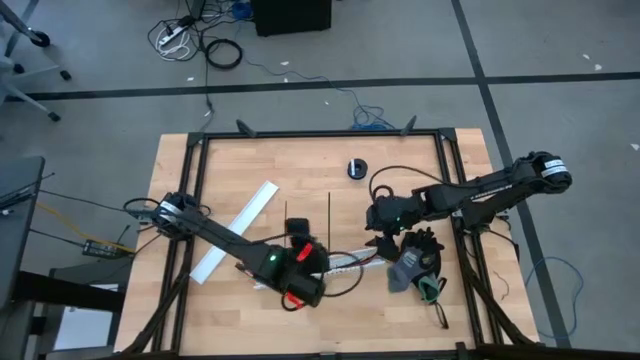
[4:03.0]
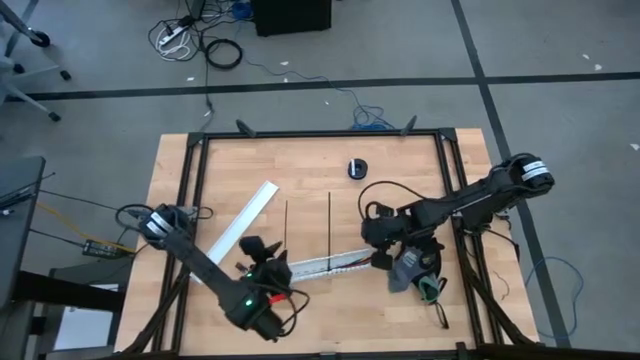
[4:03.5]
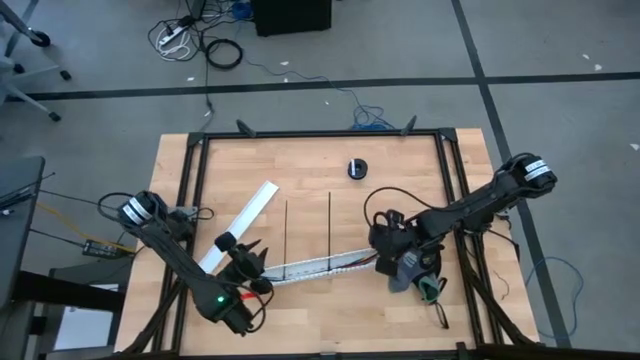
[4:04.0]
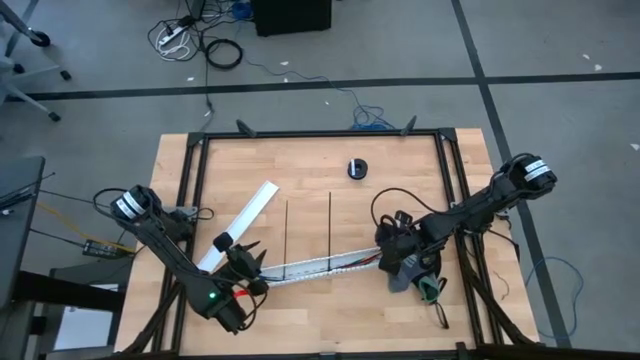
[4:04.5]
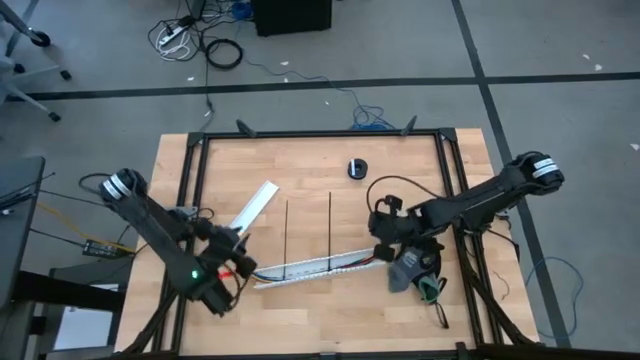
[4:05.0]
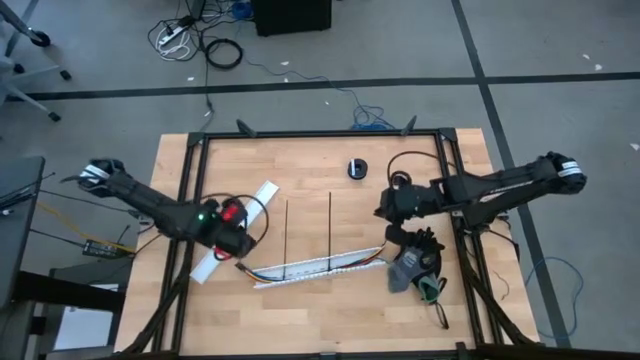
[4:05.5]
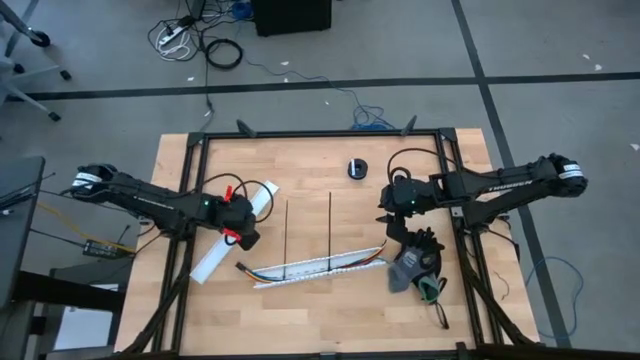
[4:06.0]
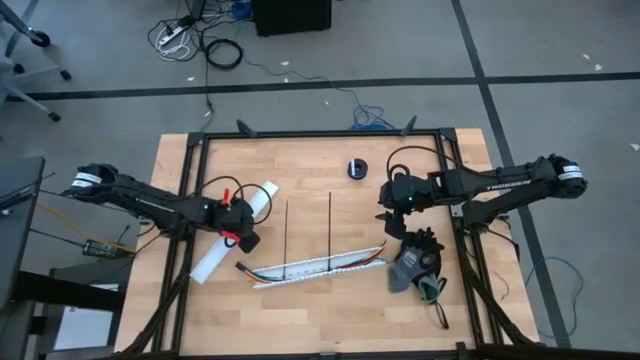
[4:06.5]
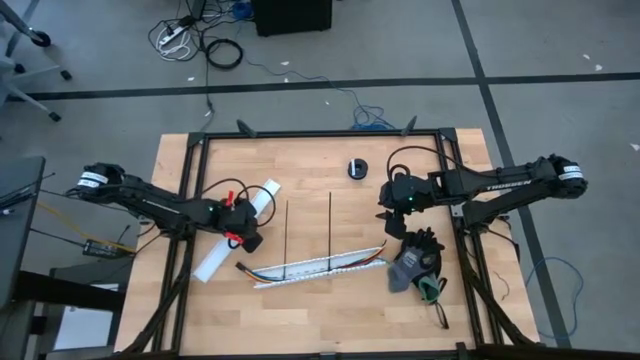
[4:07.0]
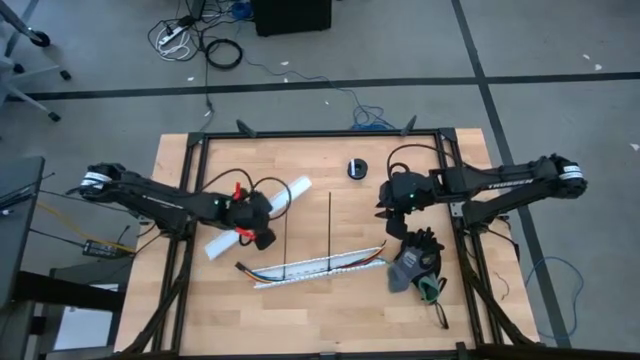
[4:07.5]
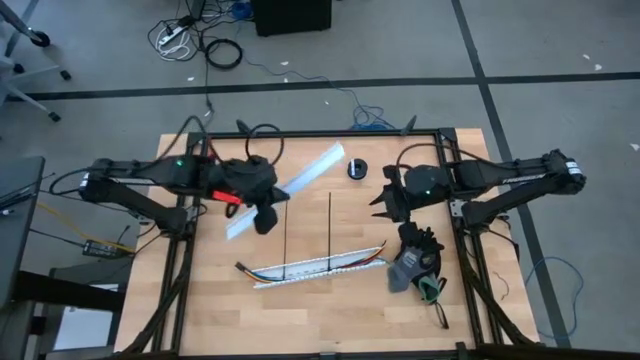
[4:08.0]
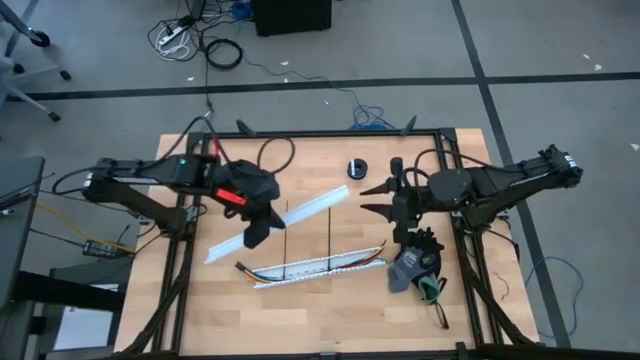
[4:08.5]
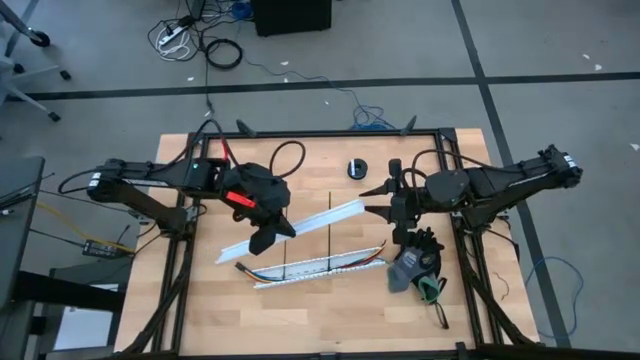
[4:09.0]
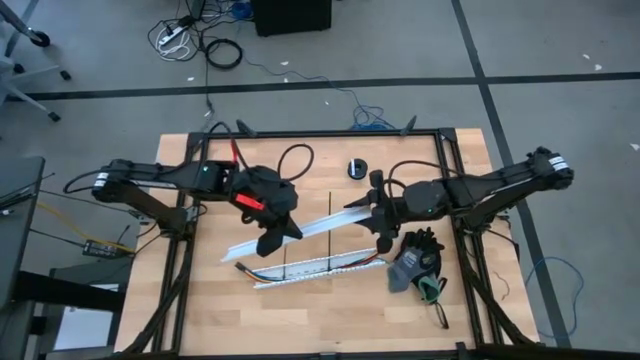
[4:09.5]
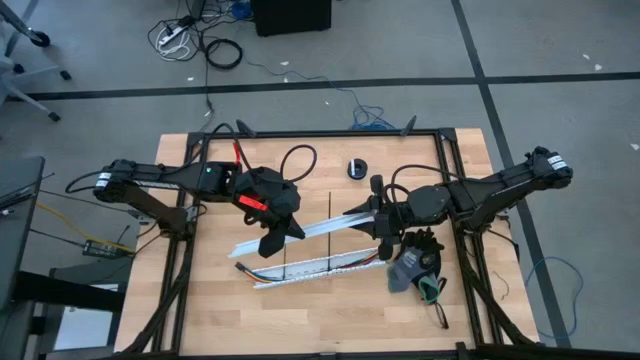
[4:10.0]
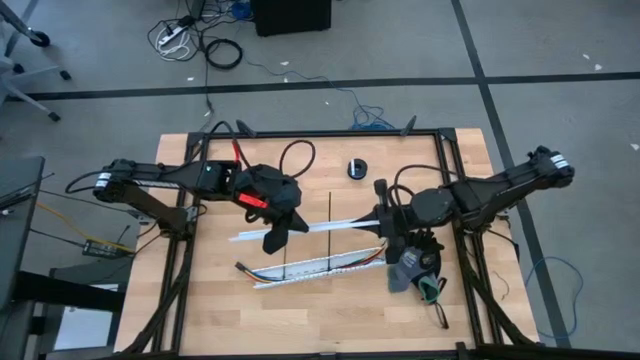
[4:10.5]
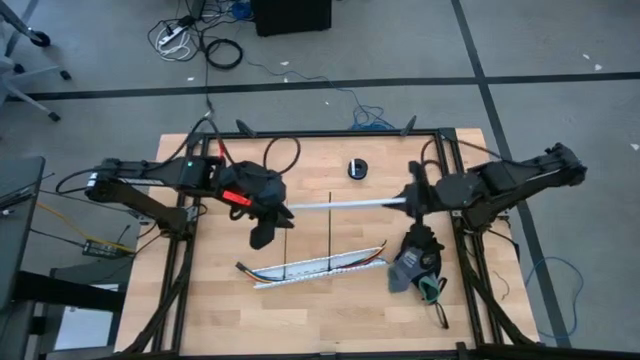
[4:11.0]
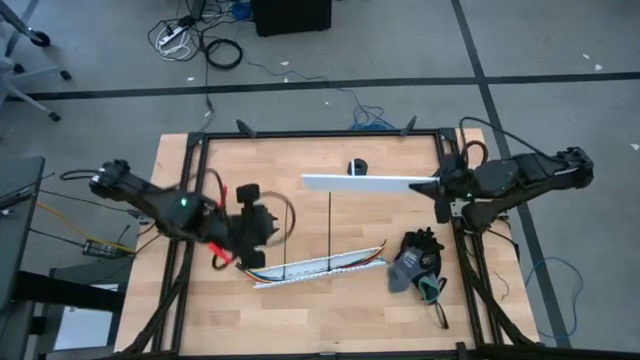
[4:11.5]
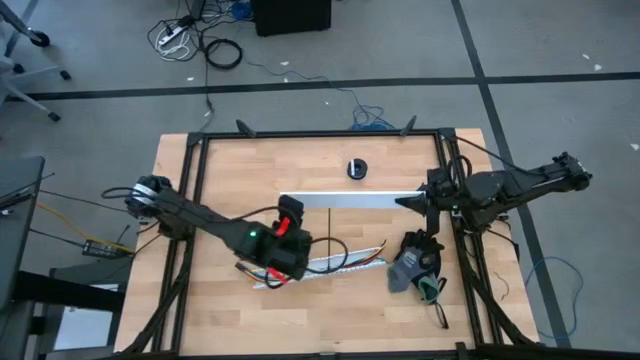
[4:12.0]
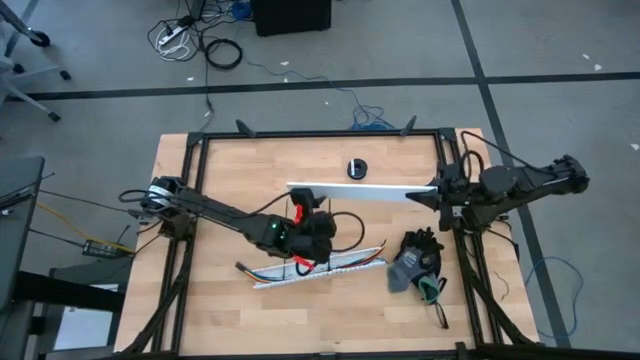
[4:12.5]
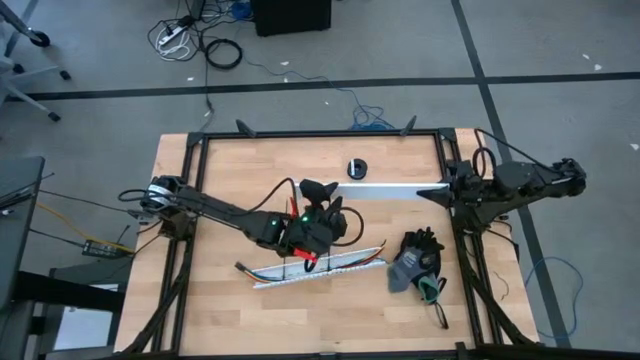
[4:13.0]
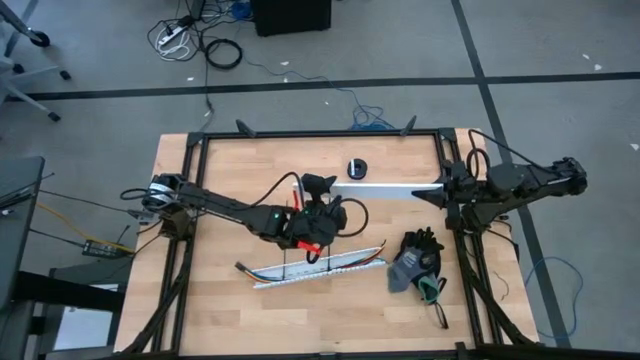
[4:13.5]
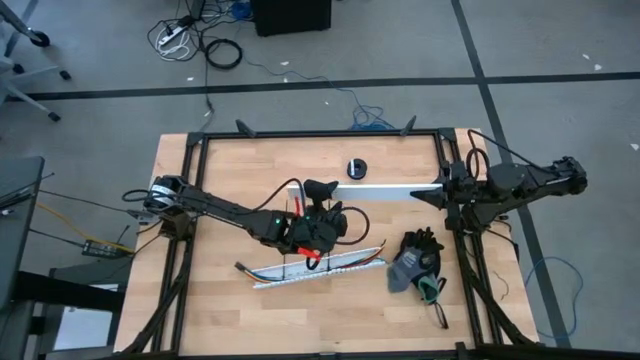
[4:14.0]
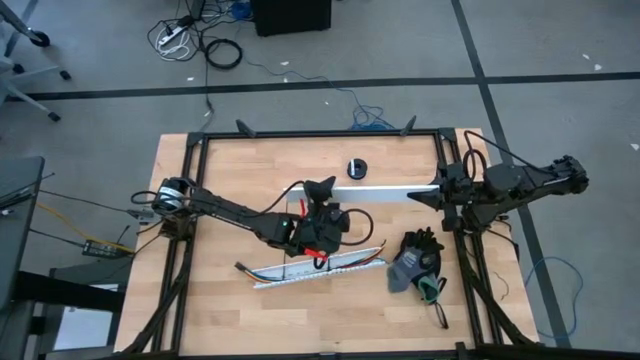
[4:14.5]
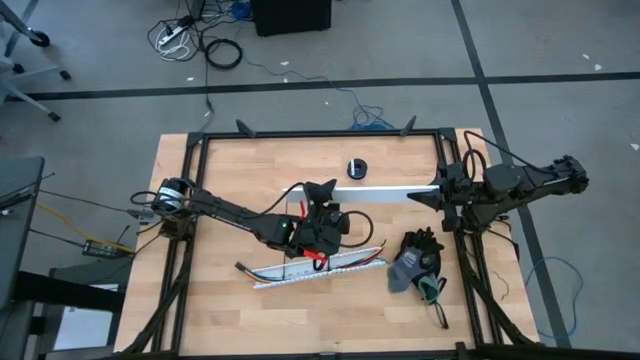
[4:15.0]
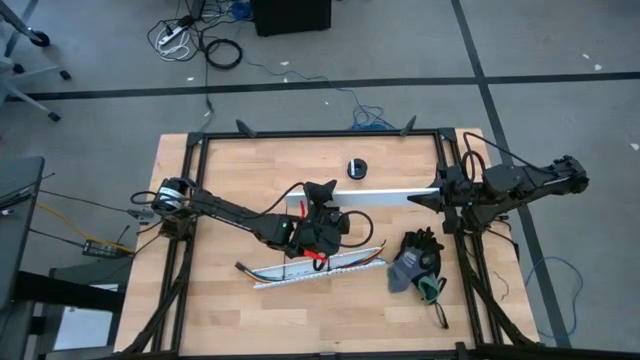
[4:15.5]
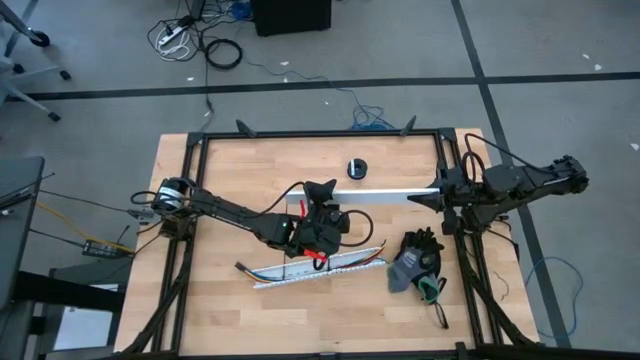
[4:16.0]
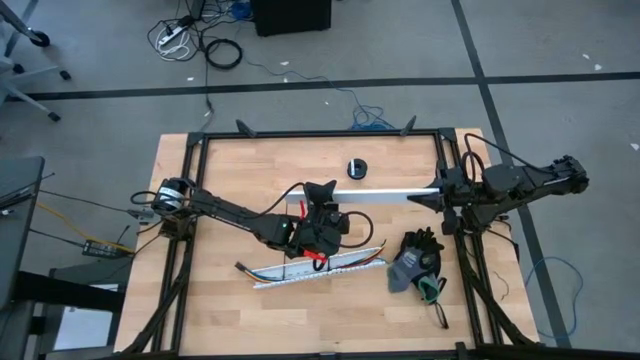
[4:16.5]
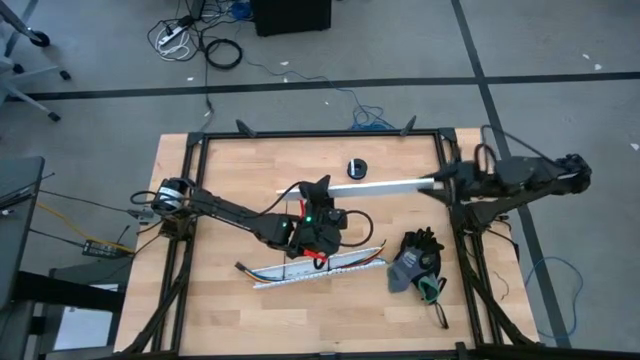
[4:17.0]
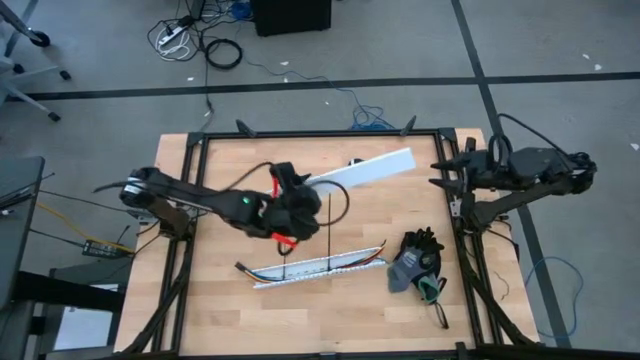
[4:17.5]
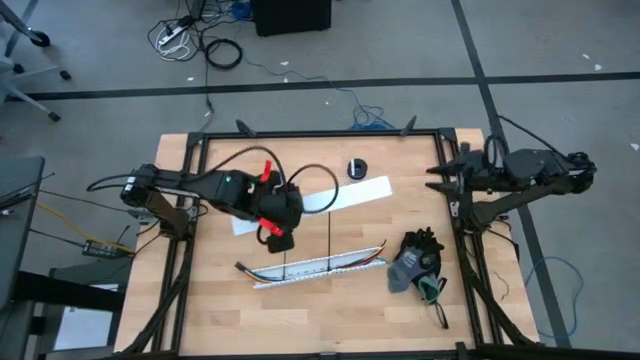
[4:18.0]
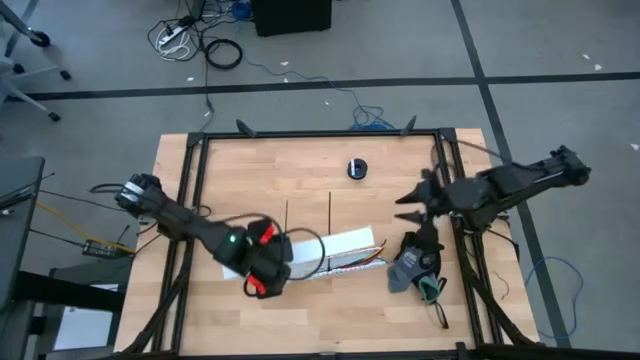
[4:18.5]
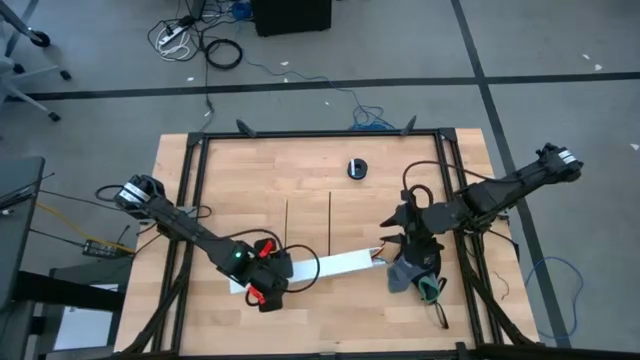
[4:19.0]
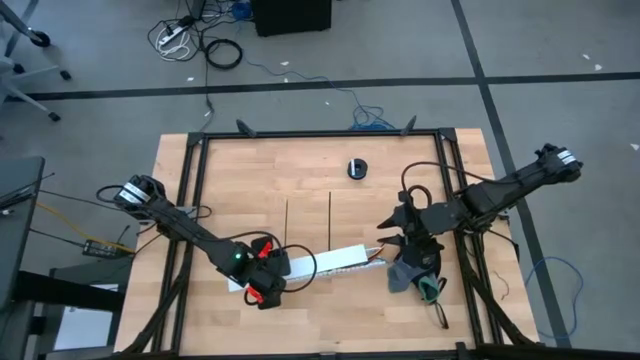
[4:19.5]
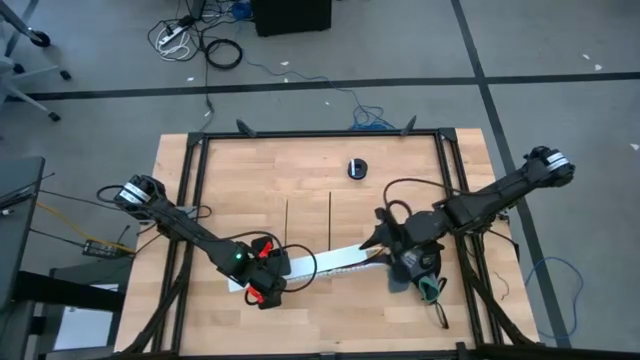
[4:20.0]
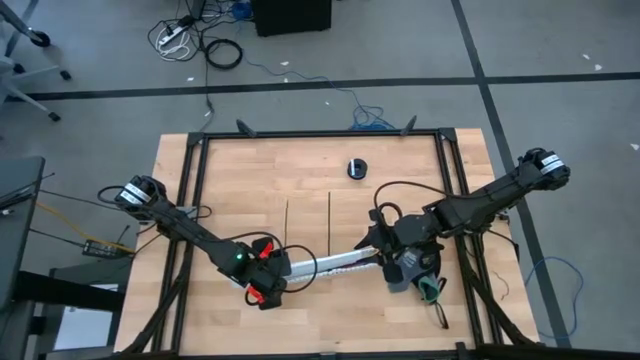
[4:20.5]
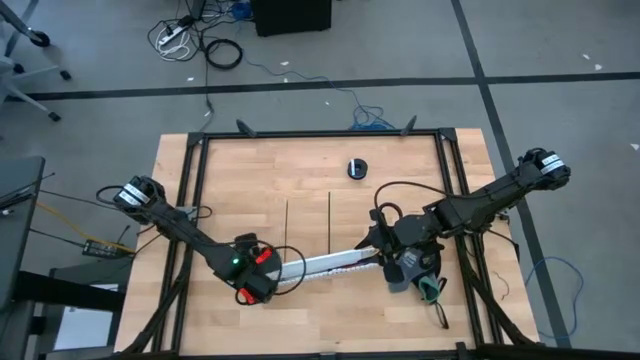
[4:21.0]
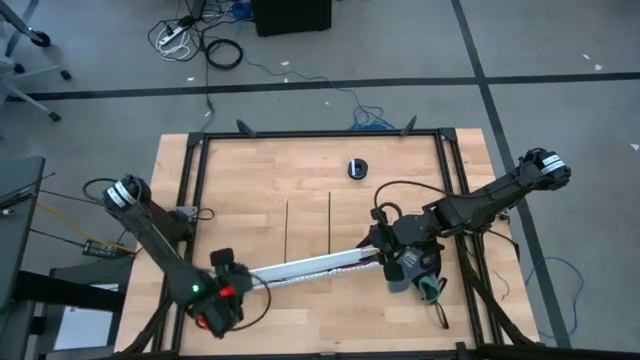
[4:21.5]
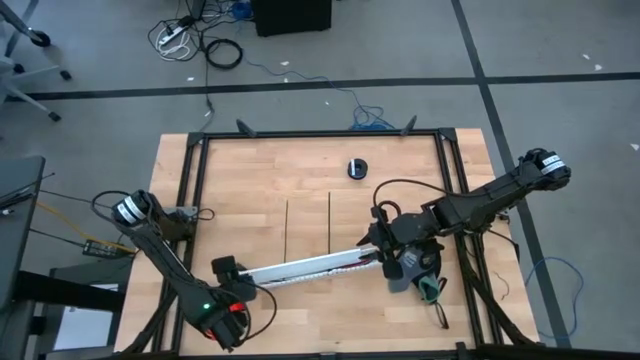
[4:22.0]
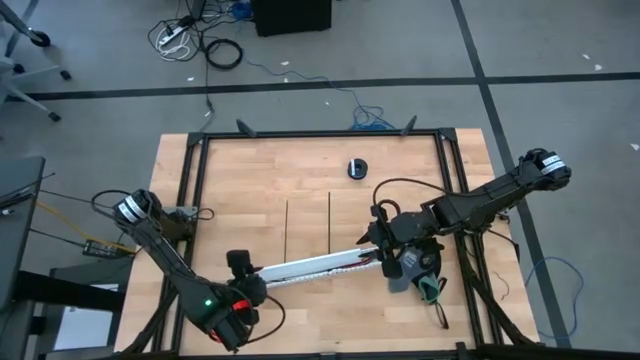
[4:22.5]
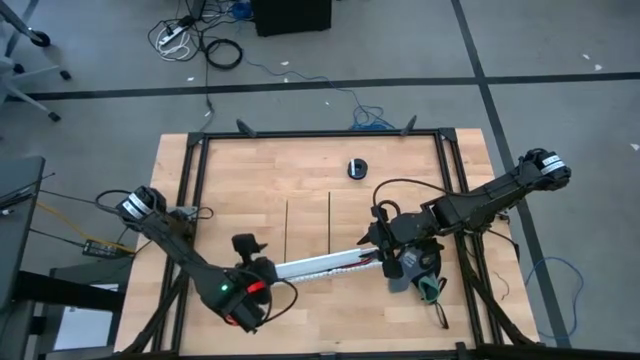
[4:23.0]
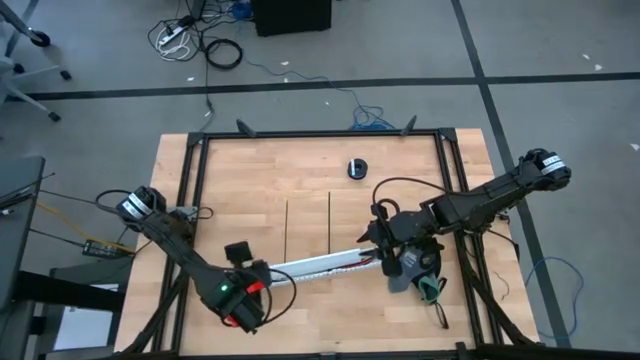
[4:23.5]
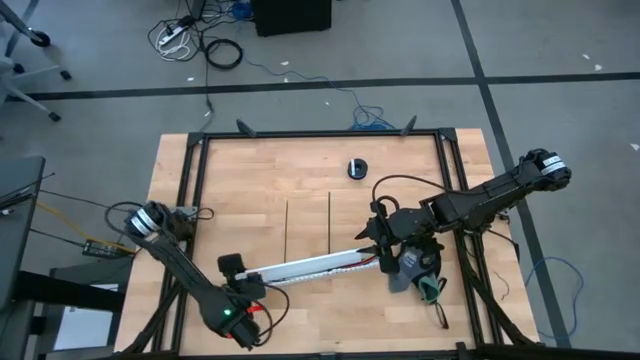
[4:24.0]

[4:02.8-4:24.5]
Task: Ziptie cables
Close the white cable duct
